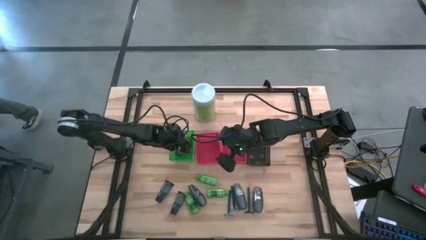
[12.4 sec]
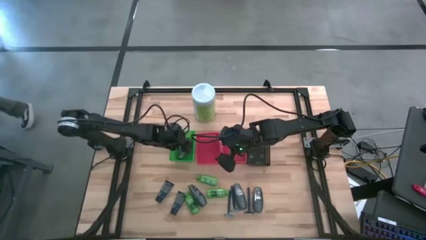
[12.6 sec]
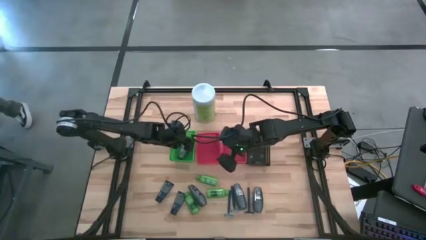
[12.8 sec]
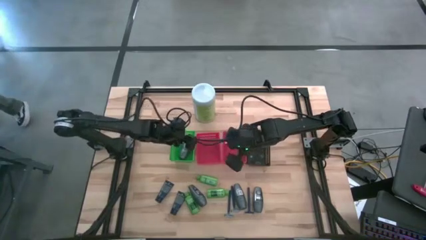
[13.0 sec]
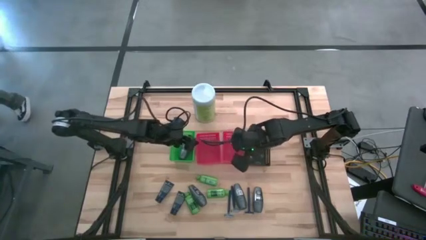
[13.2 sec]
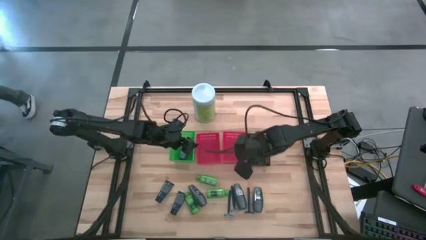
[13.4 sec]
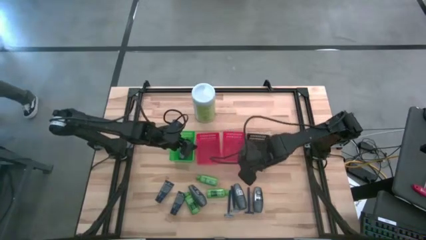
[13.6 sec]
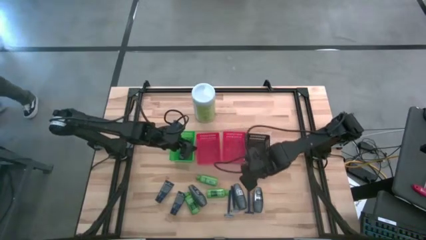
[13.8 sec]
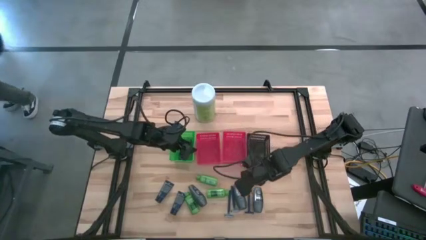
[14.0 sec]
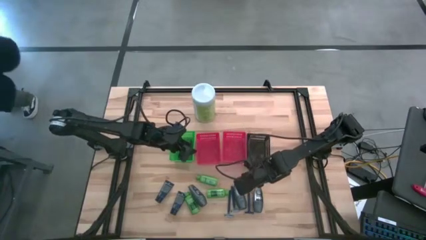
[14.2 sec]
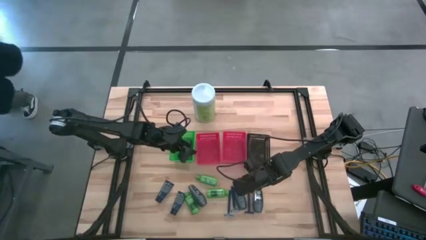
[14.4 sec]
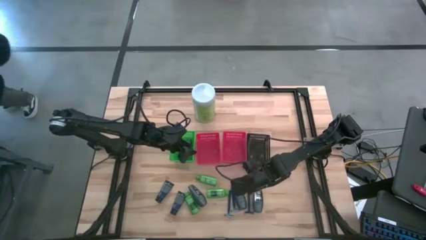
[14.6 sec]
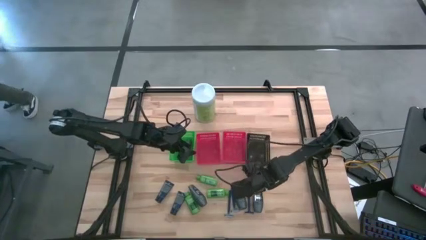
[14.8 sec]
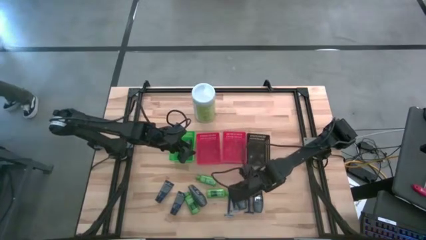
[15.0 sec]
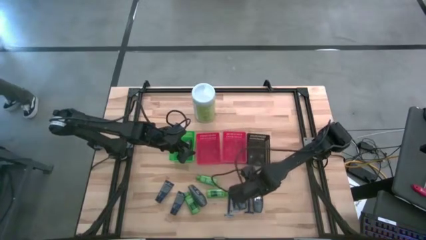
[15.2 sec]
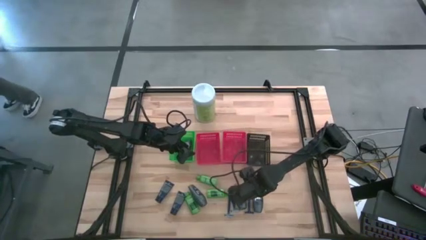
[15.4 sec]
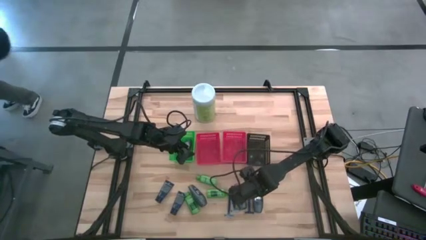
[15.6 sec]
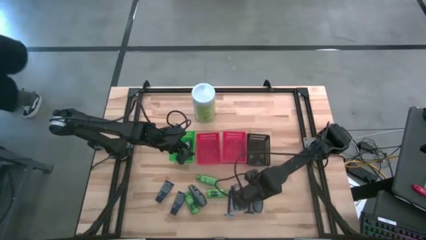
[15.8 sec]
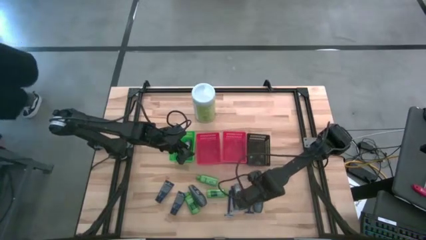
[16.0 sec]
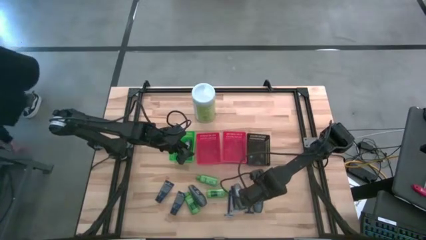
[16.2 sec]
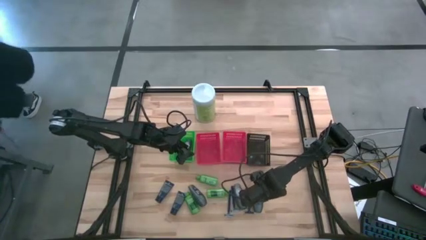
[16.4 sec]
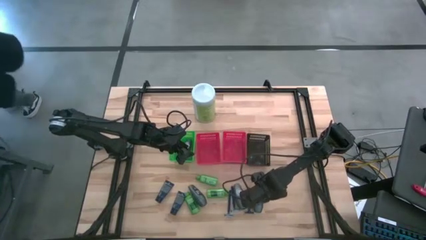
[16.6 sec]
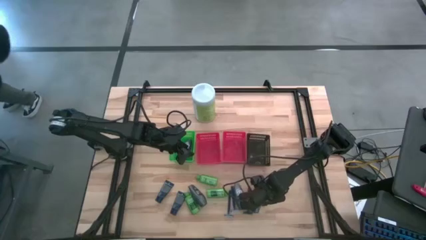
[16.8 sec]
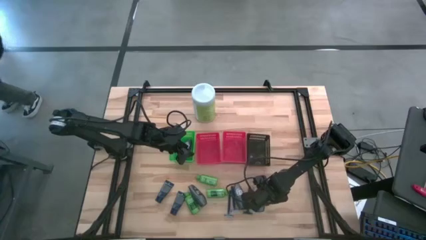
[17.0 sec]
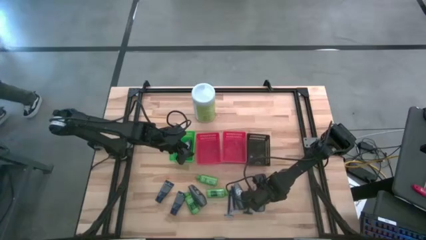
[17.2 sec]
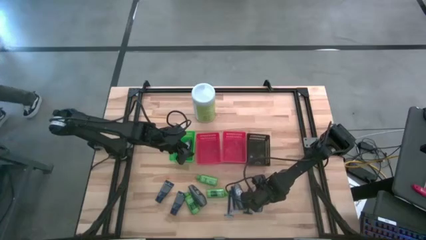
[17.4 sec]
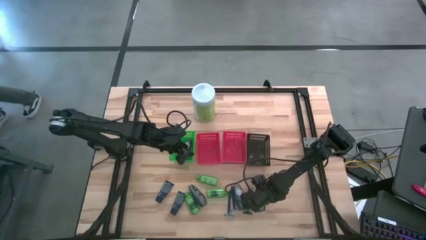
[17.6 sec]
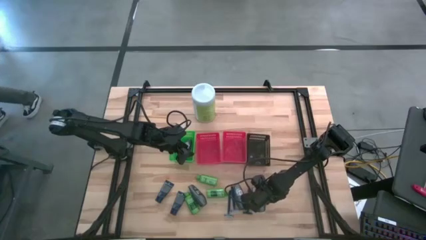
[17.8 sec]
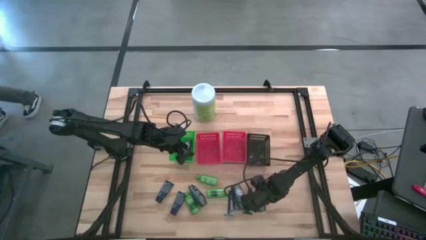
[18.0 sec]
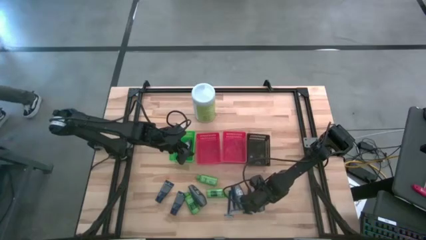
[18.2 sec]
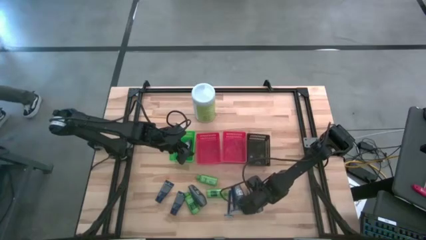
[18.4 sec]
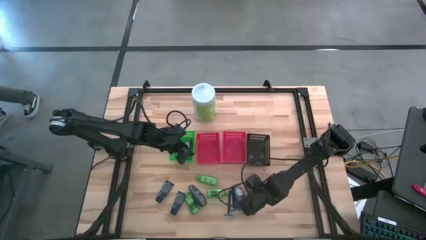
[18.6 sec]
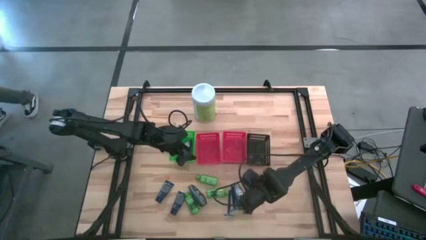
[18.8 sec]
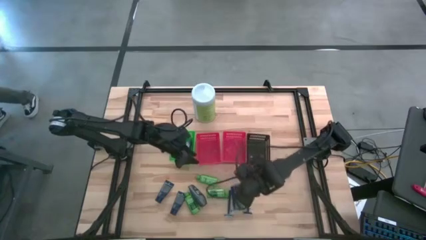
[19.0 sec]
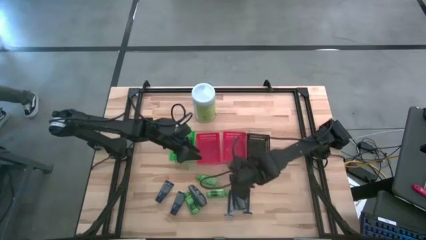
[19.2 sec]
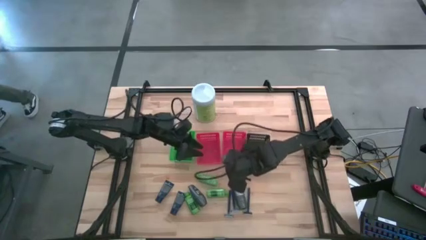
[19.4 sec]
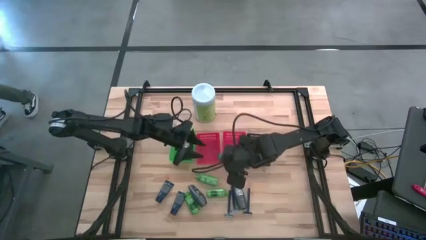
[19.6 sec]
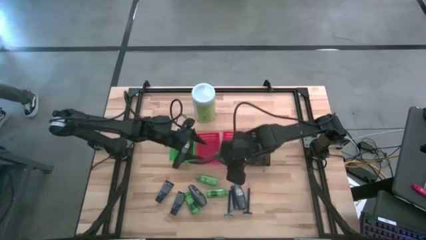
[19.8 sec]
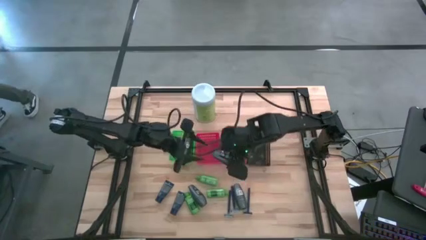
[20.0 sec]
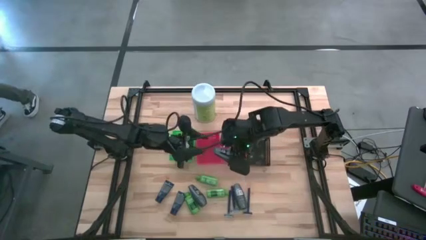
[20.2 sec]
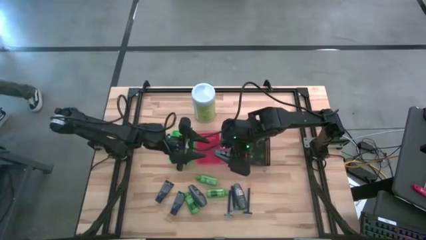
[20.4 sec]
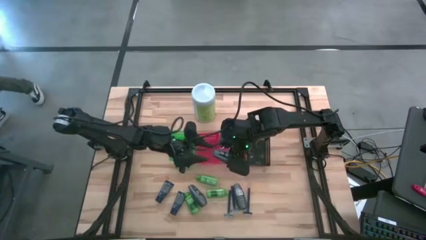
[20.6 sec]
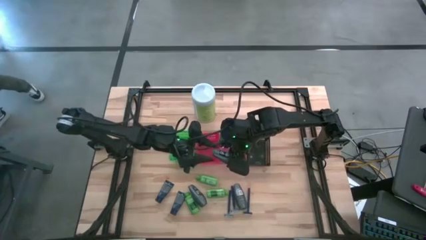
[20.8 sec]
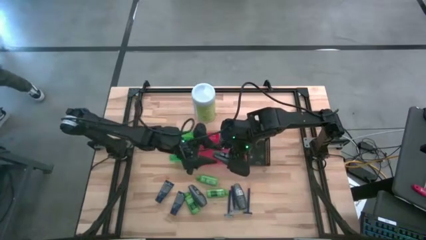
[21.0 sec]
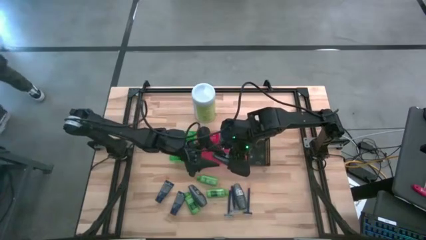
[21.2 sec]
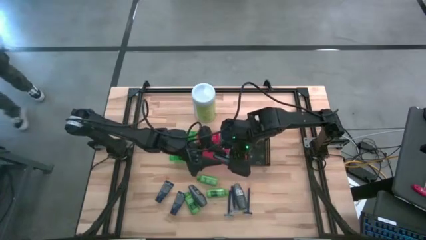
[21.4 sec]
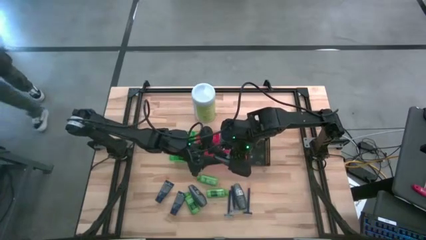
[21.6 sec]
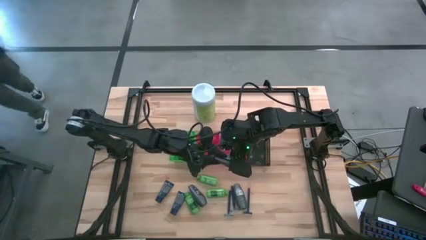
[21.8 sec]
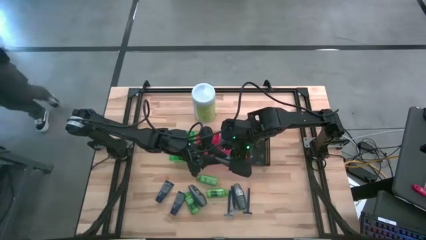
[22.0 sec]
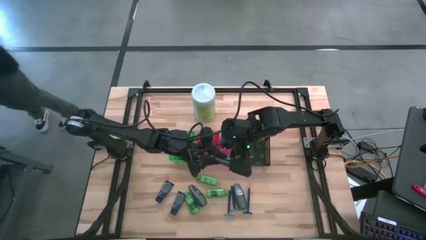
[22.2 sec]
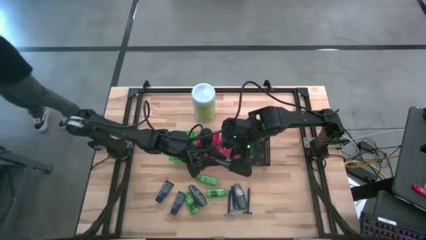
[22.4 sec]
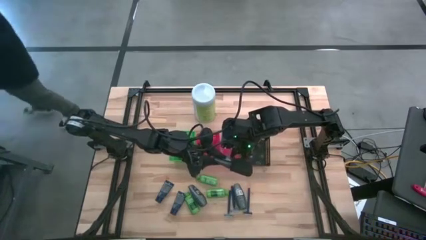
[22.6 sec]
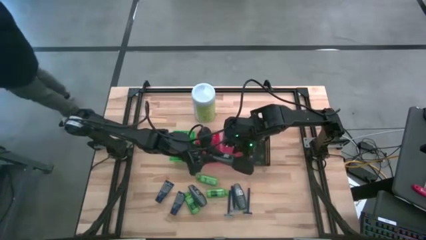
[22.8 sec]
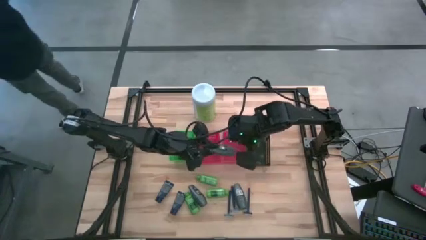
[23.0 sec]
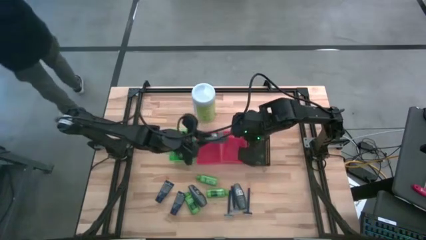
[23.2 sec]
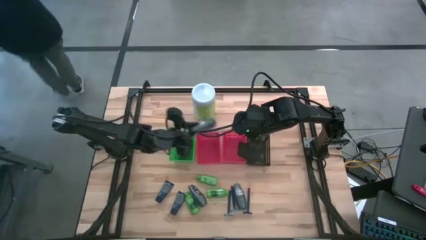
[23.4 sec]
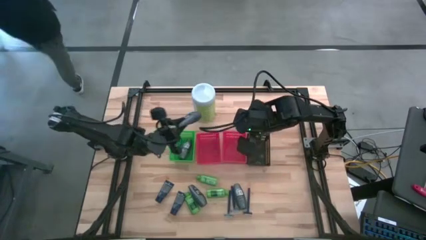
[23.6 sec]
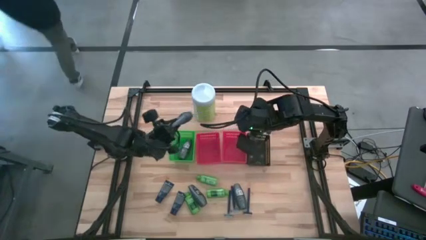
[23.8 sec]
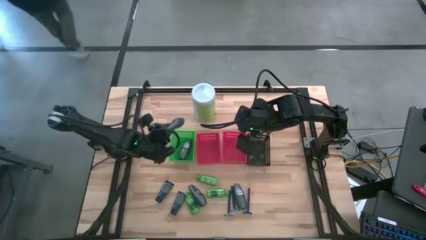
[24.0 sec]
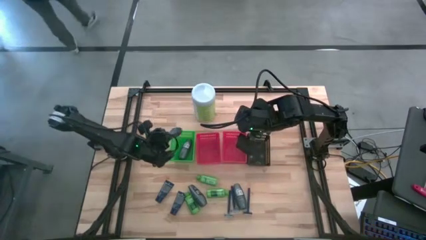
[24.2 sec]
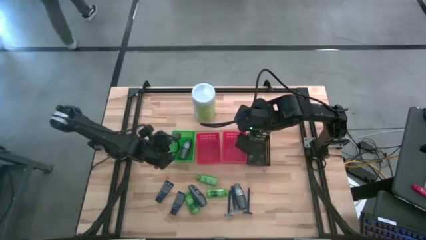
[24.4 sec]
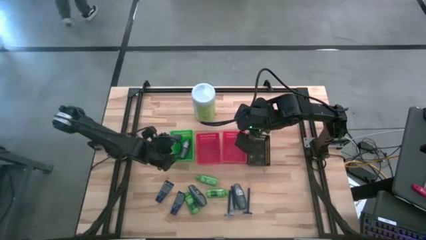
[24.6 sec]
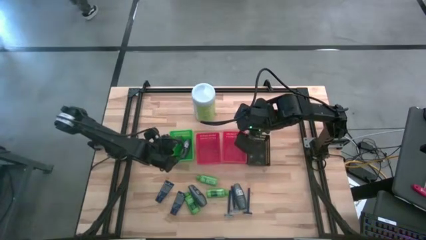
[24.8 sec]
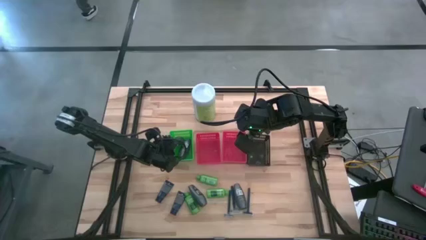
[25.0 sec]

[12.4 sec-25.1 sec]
Task: Pick & Place Travel size toiletries
Put the black deodorant into the green bin
